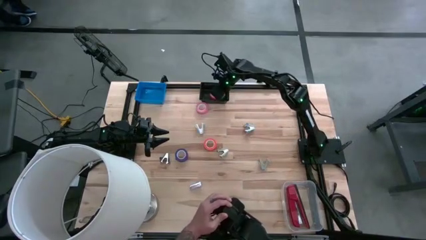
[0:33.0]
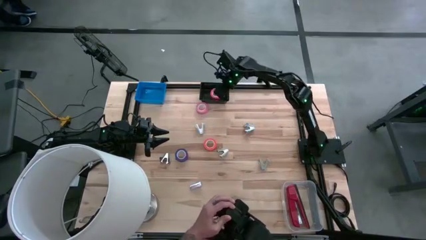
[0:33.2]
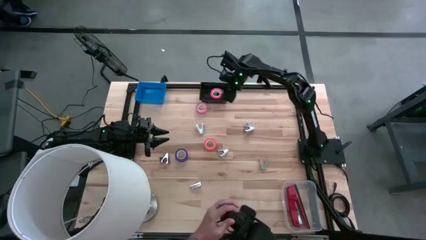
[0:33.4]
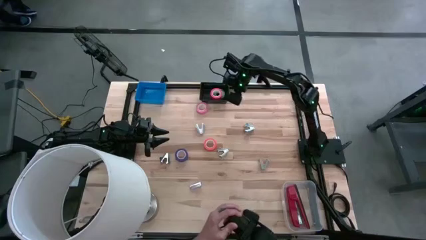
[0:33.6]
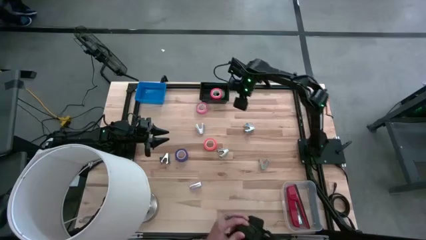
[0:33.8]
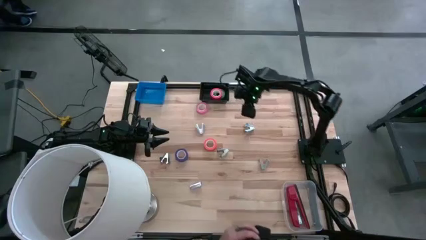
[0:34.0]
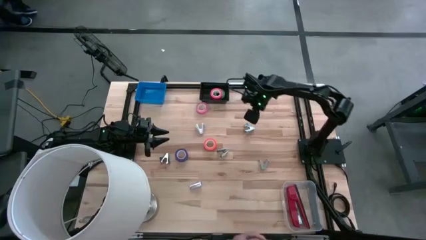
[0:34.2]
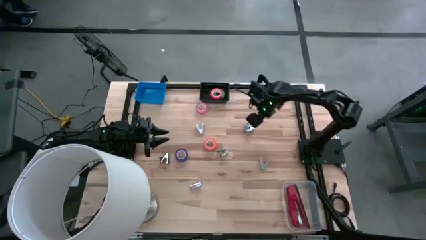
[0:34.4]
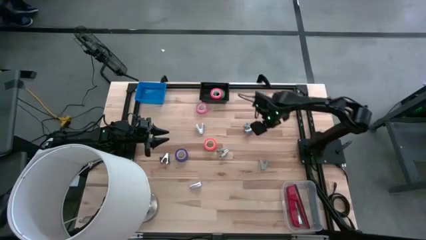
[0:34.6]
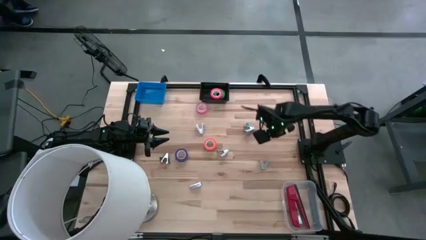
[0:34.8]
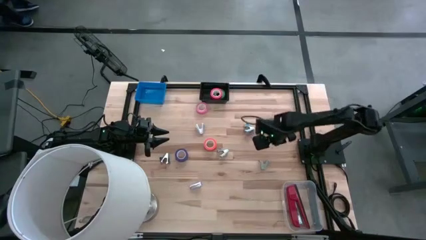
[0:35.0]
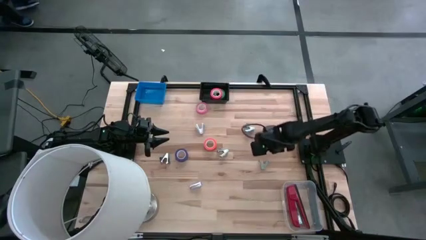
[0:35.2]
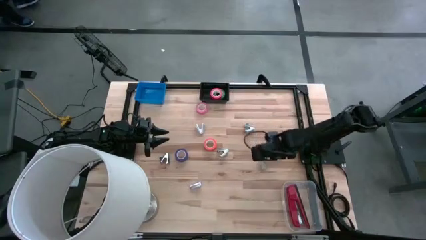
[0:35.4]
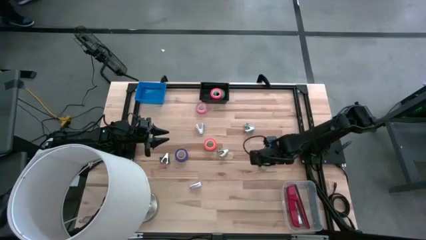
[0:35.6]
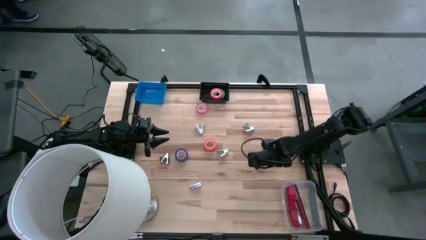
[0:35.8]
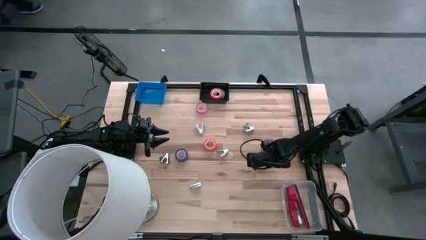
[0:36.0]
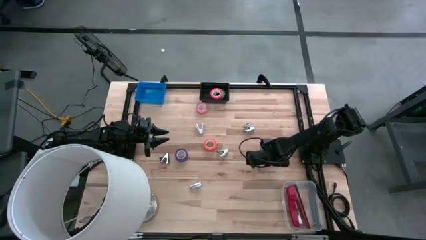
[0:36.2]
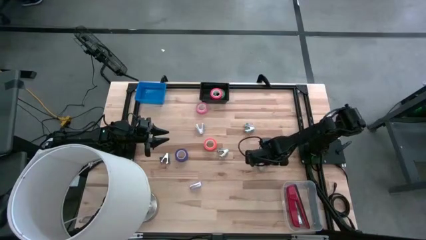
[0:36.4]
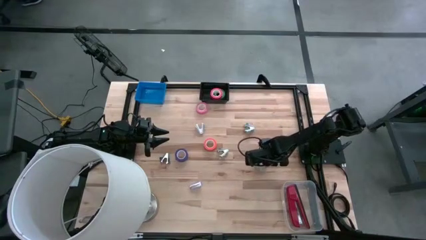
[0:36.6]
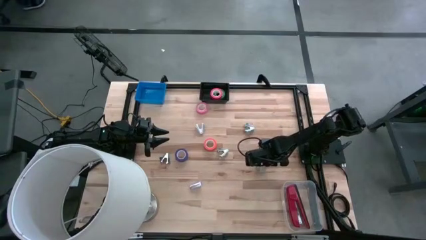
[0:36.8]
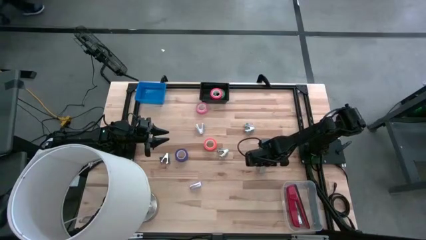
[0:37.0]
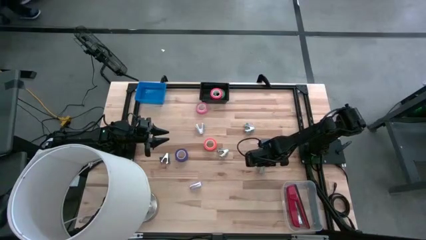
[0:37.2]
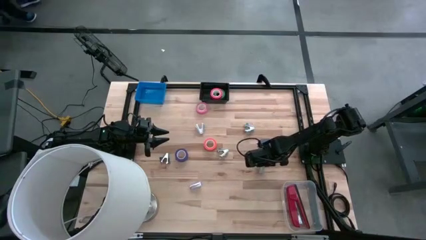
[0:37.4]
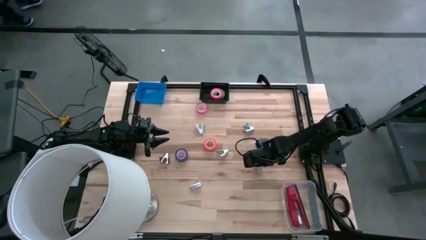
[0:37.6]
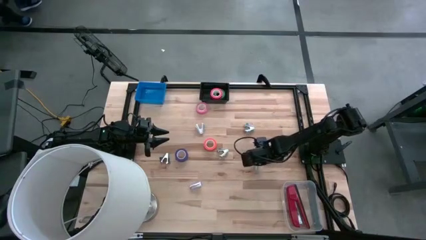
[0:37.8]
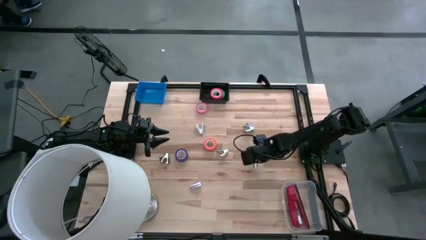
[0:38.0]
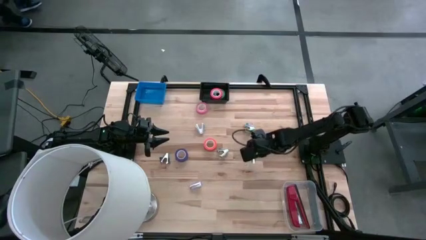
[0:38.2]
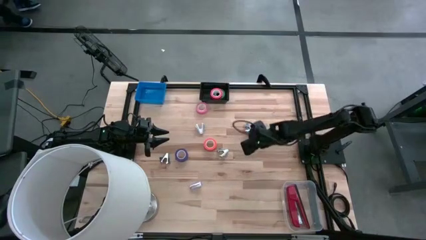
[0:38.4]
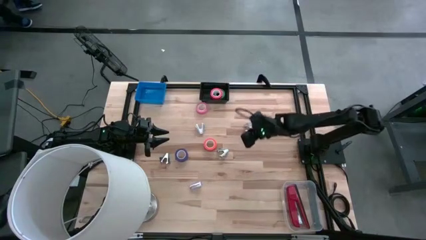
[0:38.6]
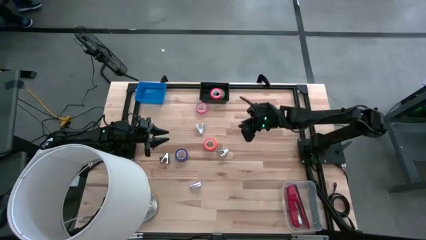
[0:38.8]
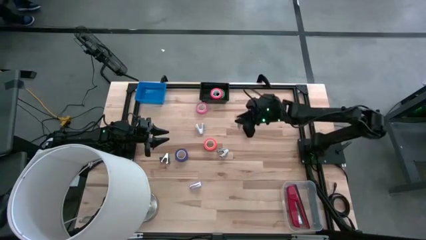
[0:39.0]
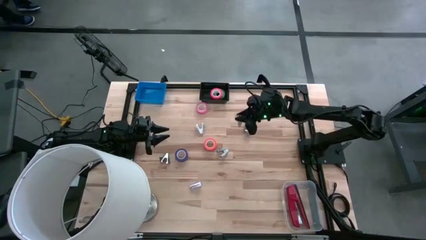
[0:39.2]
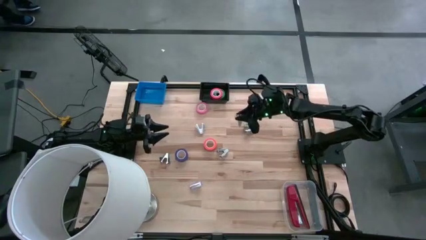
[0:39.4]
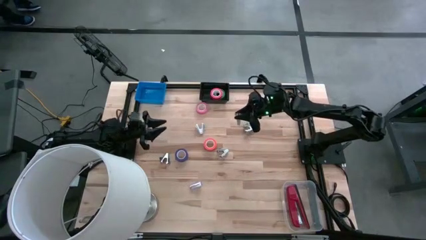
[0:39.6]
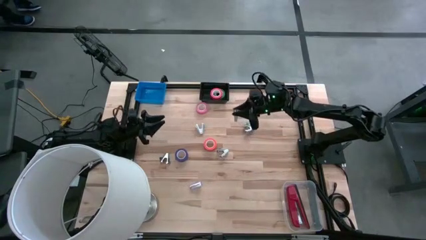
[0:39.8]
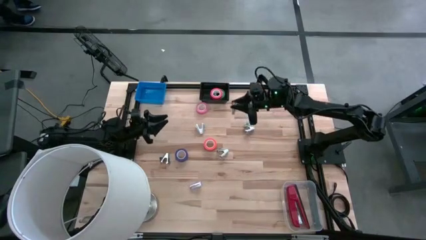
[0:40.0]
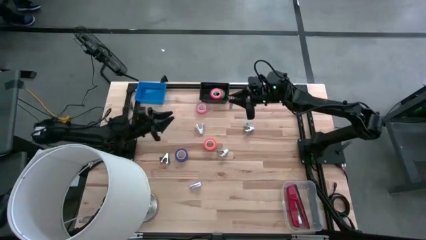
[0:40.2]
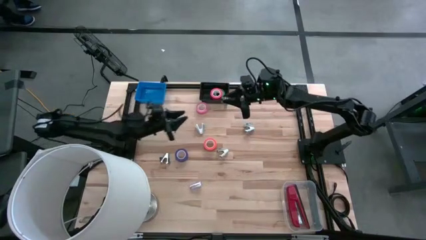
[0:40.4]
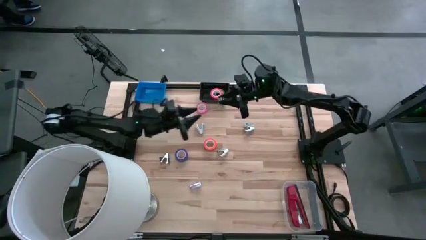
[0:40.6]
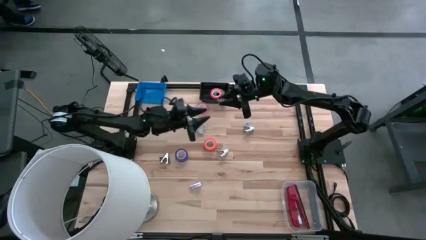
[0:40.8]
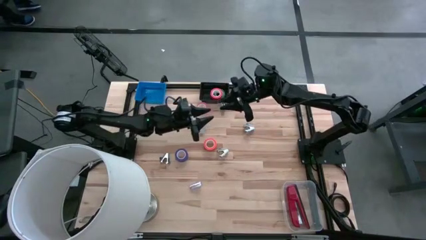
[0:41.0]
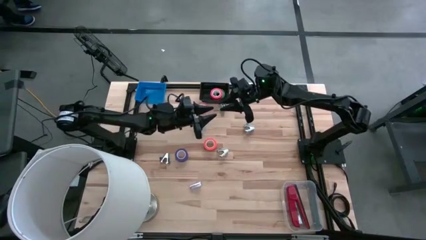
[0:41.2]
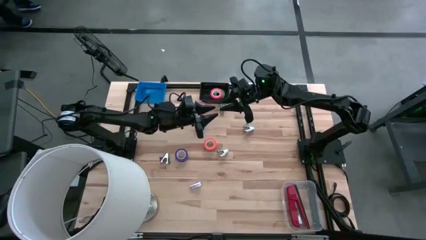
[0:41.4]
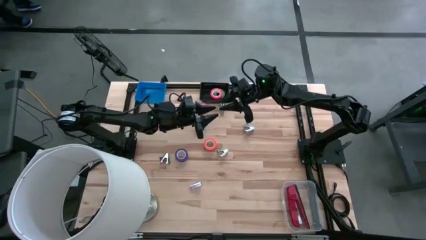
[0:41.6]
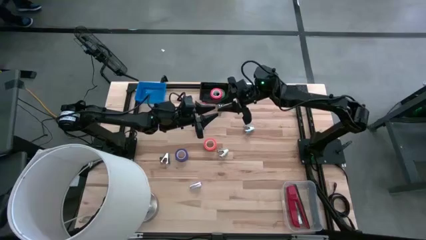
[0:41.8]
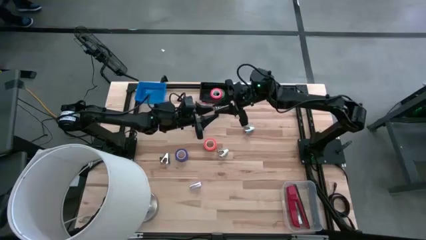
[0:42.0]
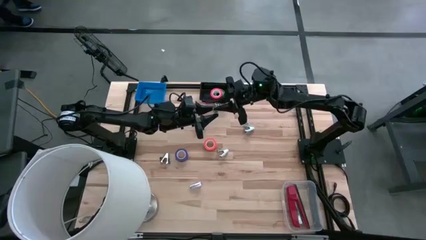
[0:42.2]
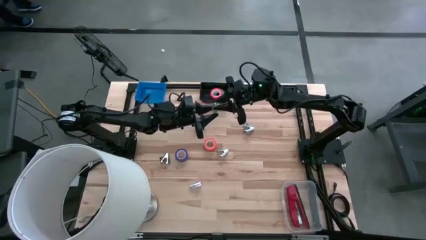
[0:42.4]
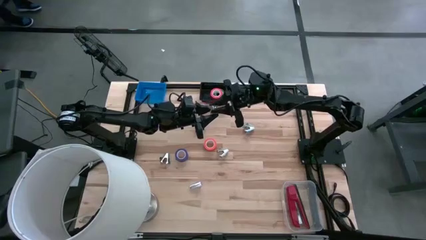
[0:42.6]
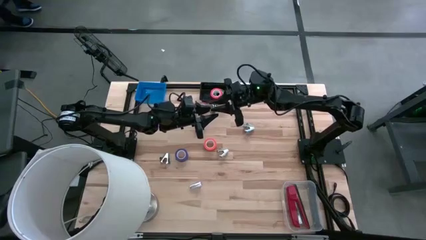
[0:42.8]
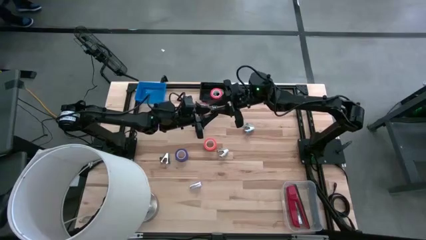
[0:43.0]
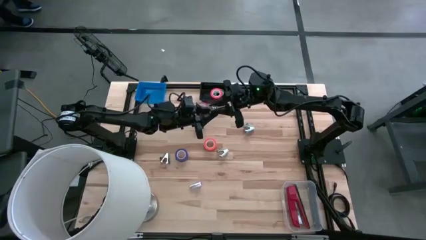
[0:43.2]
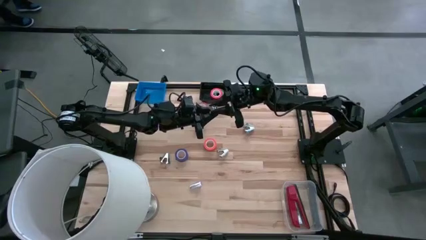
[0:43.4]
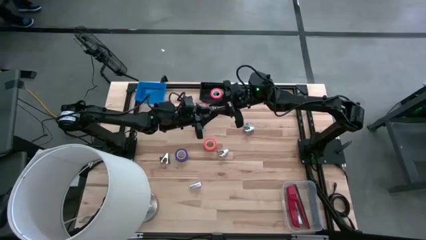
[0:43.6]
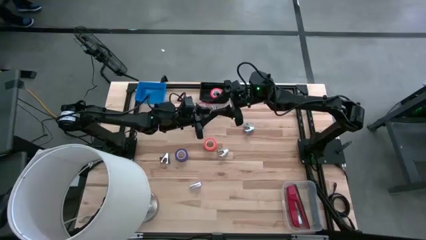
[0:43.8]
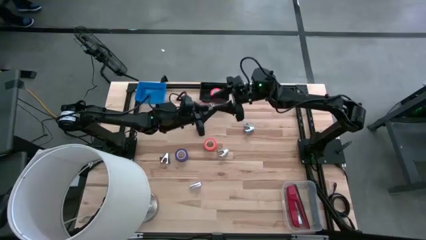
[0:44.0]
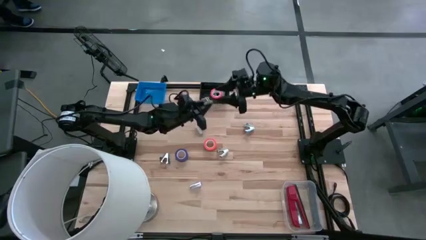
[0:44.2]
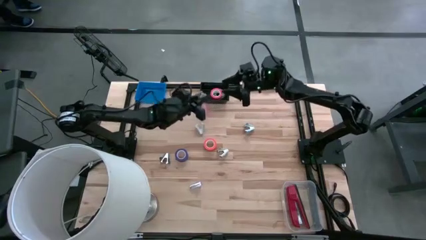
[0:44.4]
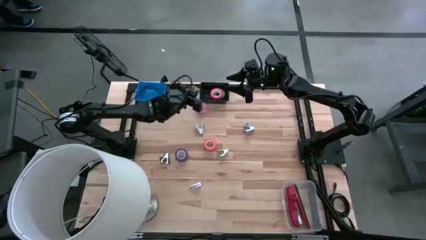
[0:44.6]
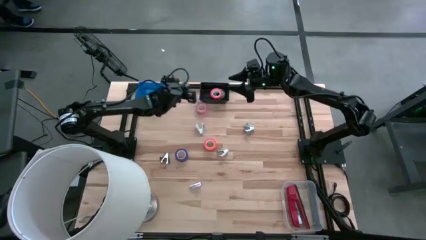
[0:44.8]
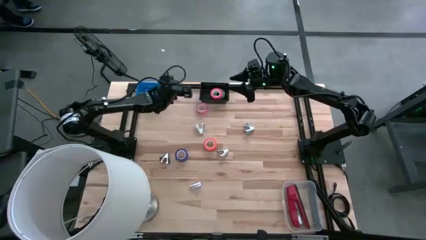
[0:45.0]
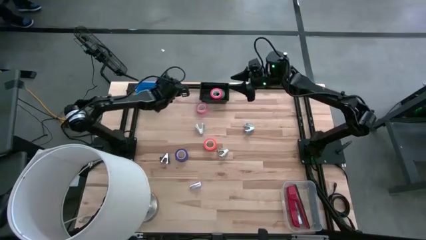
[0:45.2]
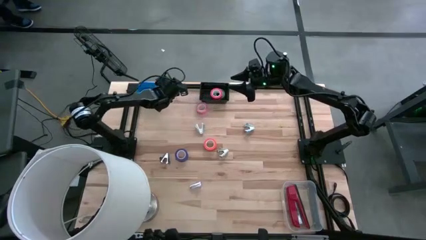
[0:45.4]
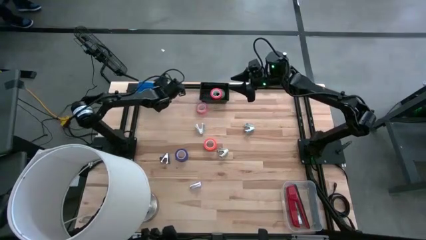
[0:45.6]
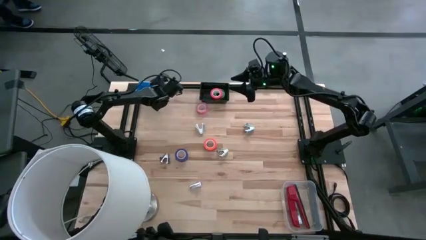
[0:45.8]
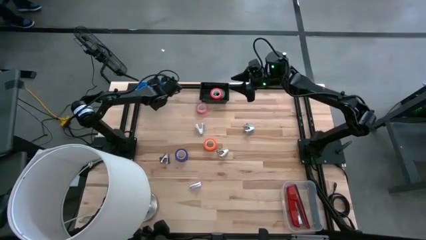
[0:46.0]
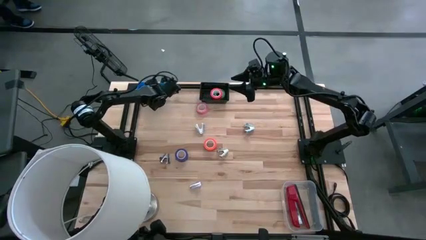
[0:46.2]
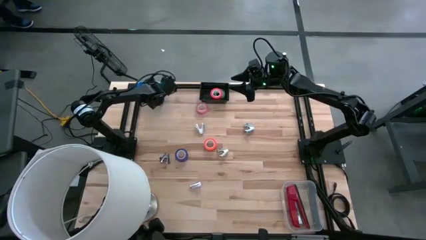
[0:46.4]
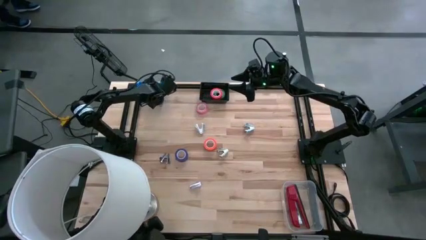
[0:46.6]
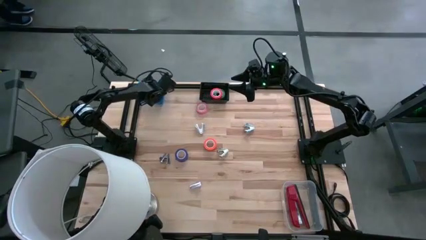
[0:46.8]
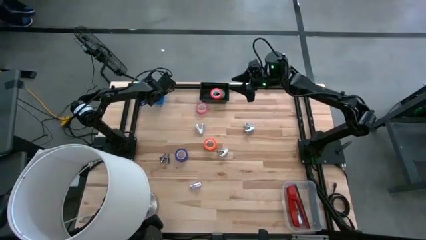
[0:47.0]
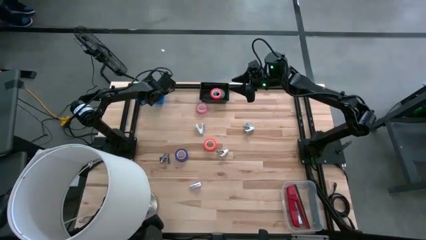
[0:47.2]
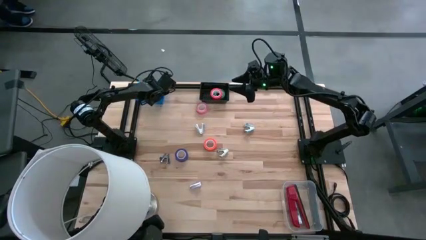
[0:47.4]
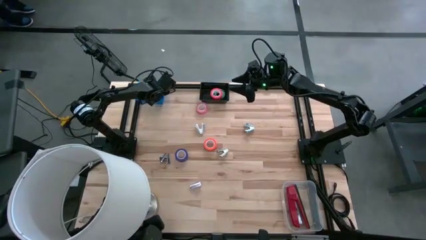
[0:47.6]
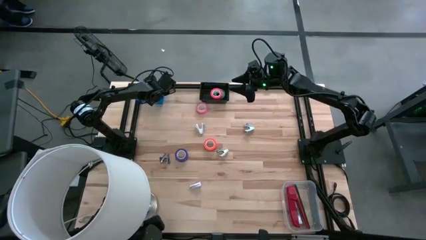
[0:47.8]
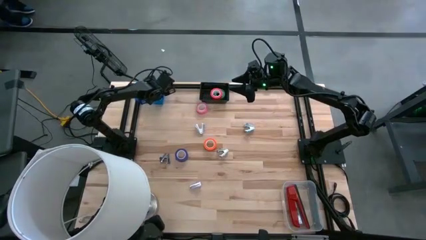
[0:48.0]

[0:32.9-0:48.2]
Task: Pick and place Stapler, Stapler remover, tape
Put the right gray staple remover into the blue bin
